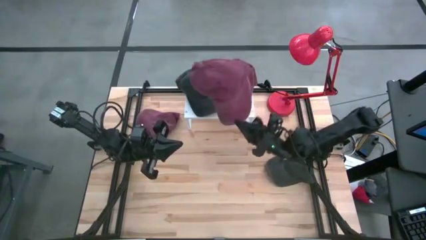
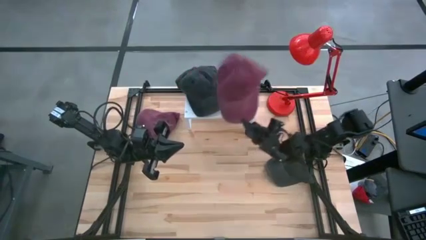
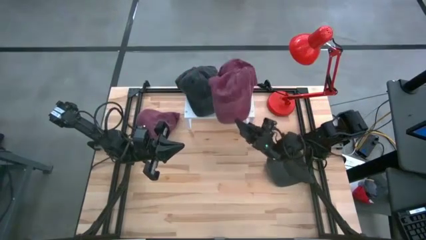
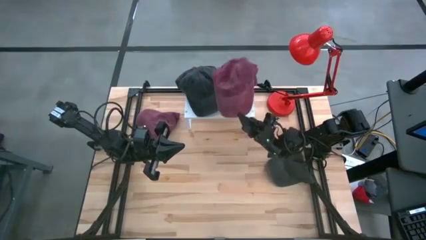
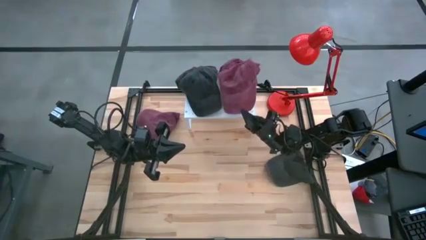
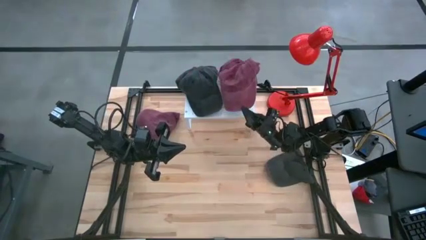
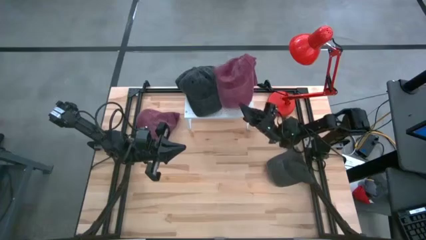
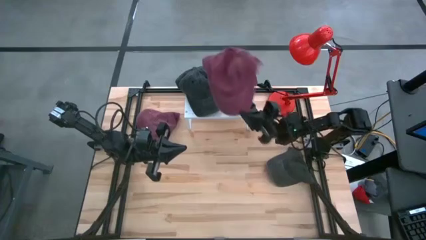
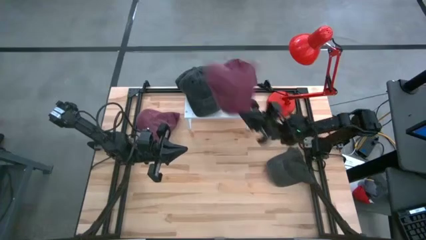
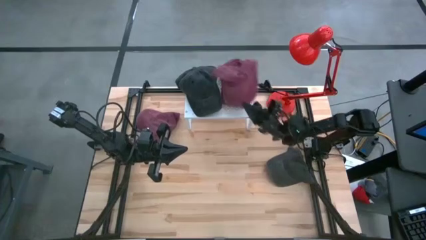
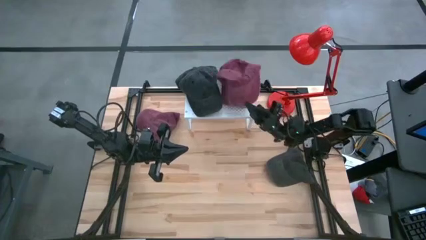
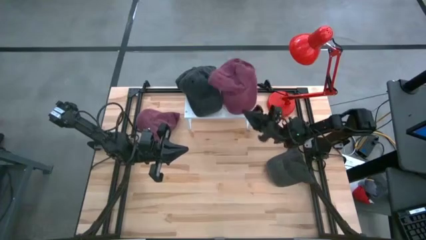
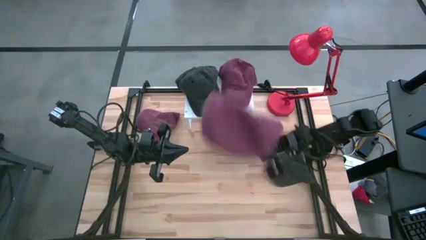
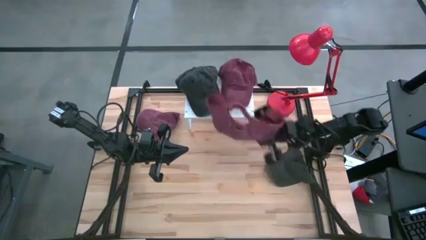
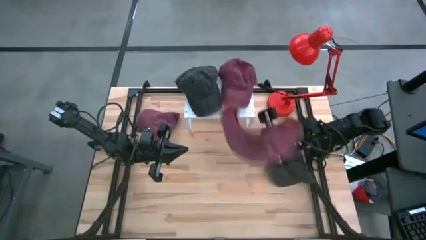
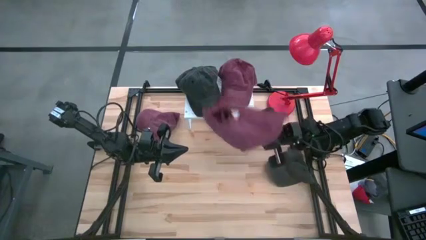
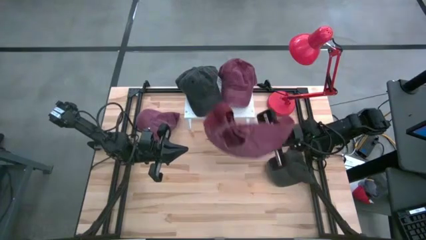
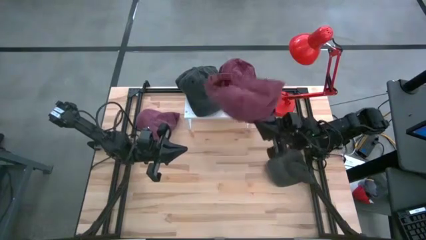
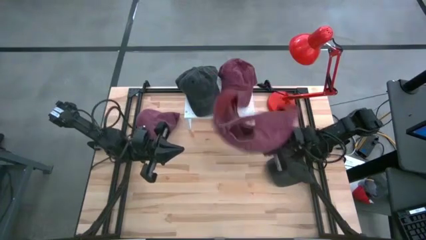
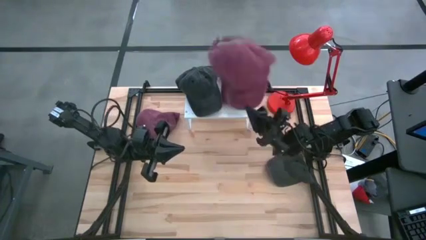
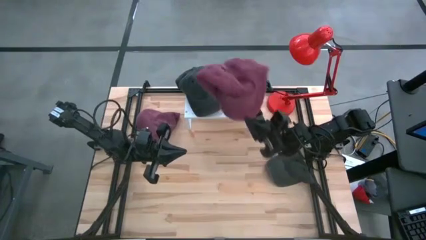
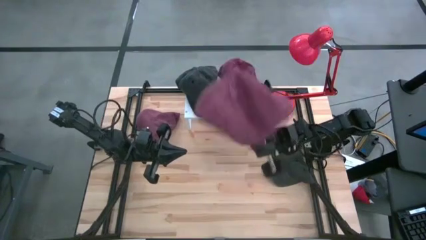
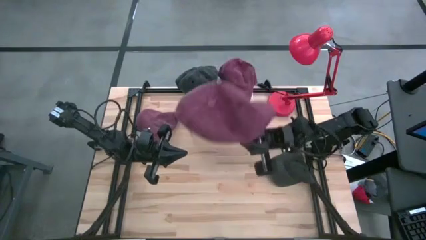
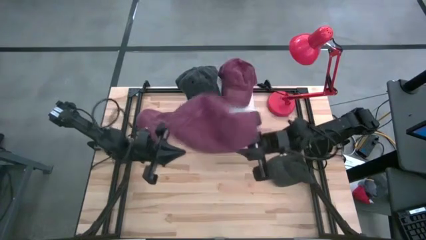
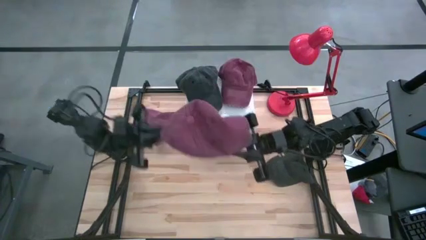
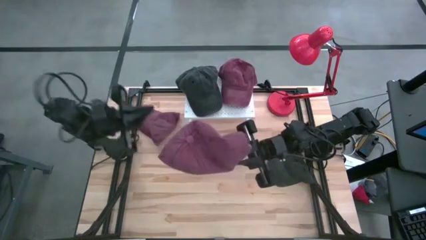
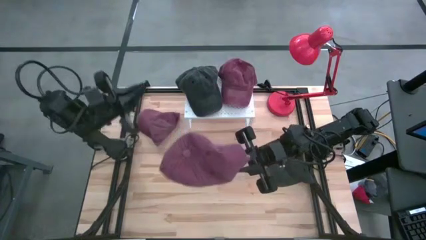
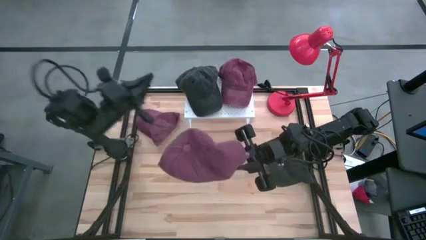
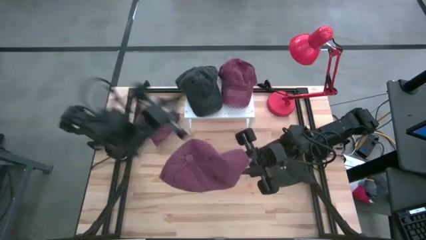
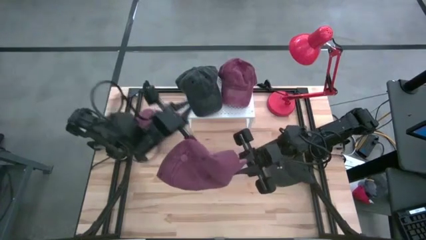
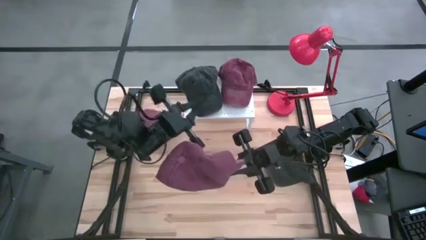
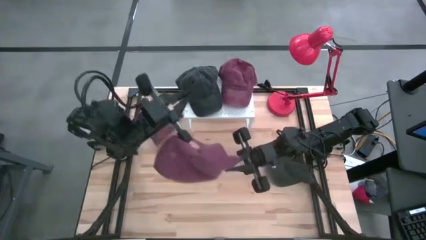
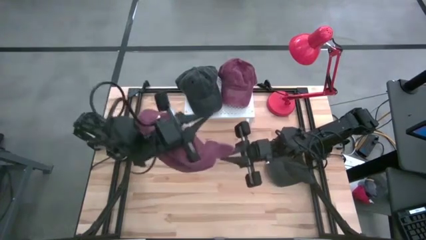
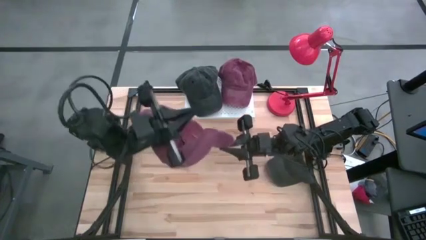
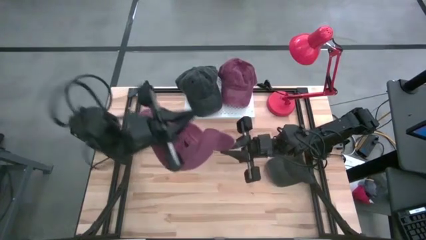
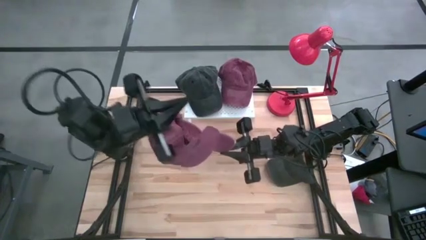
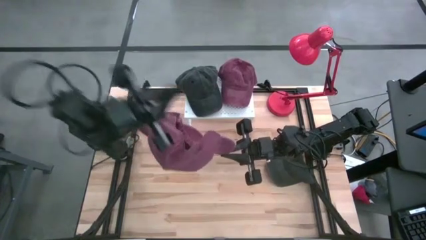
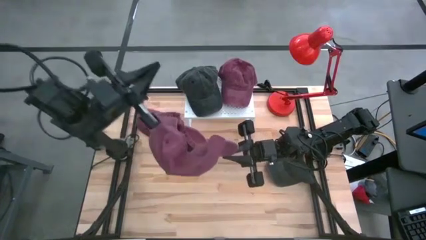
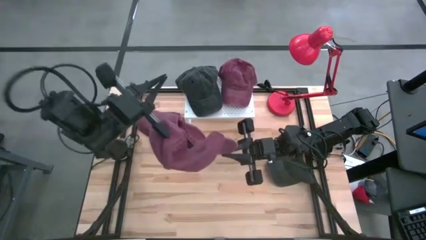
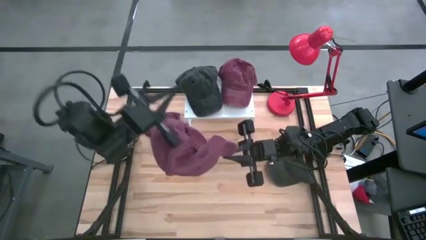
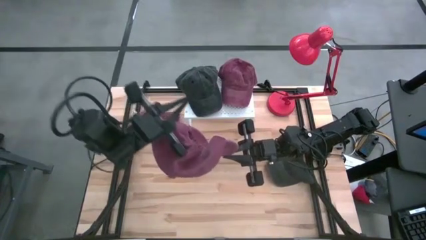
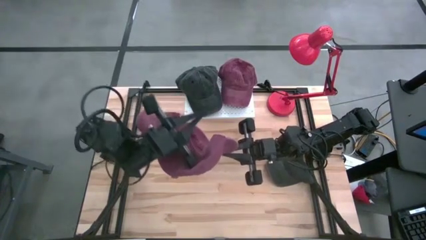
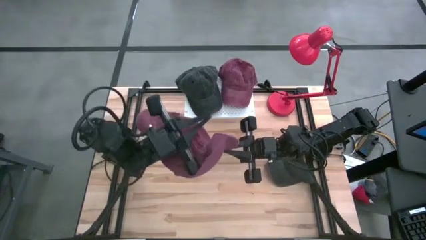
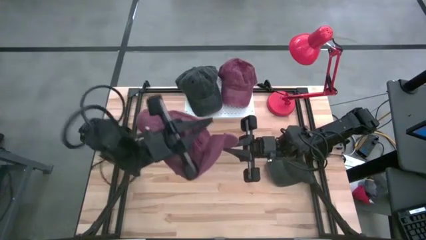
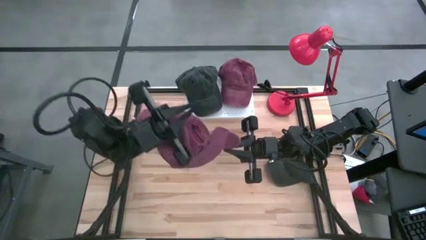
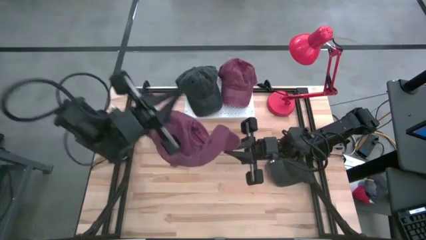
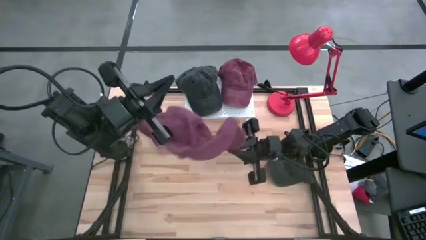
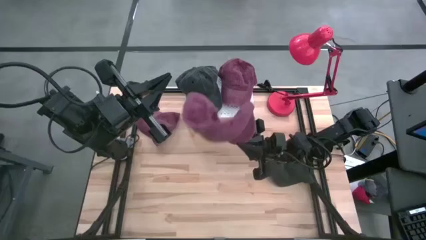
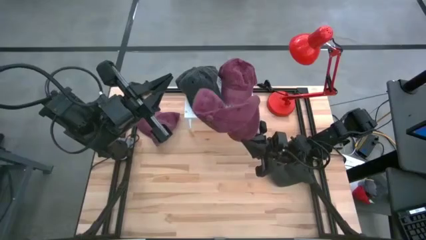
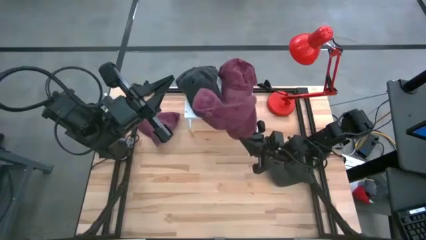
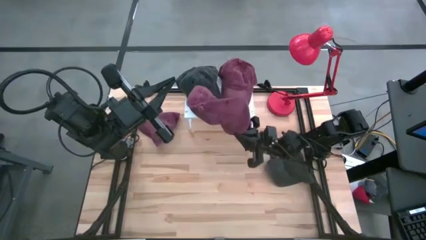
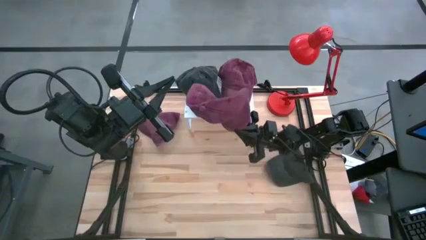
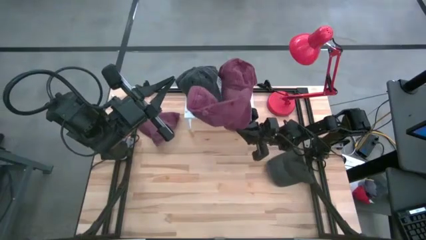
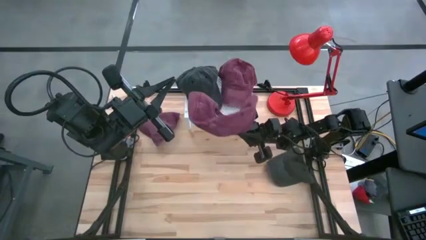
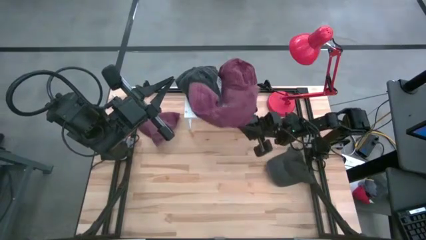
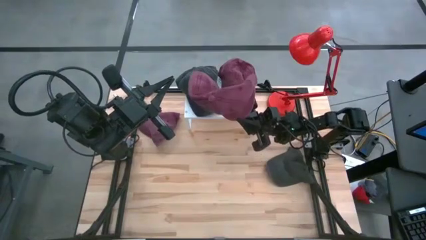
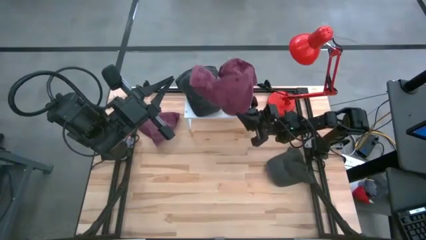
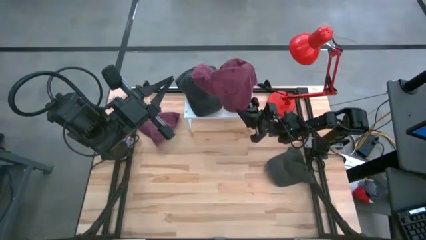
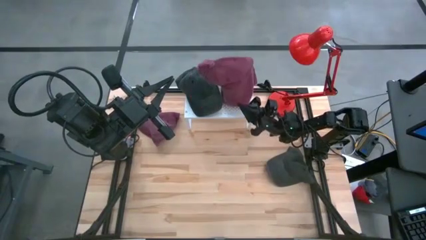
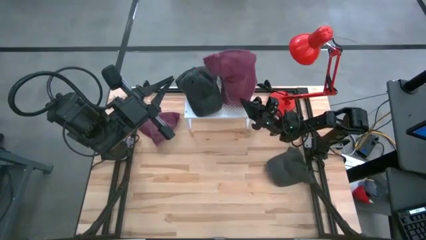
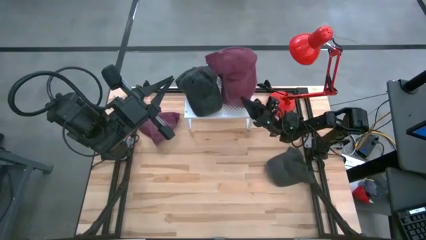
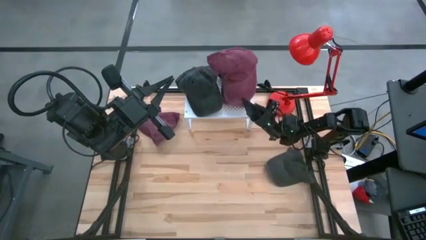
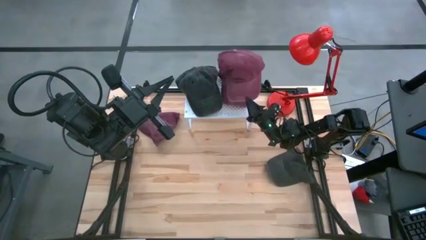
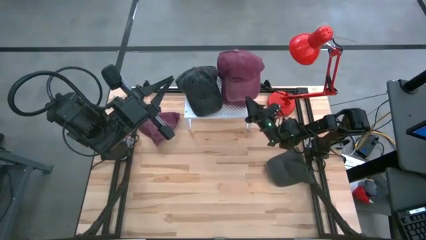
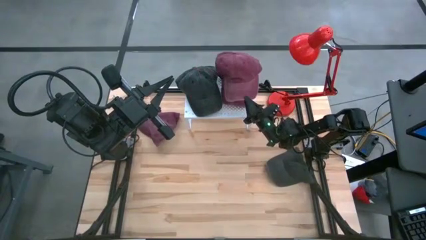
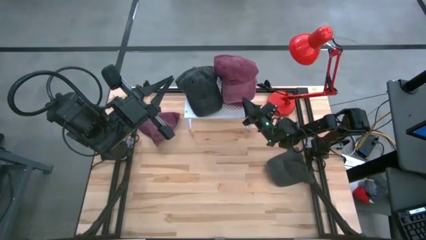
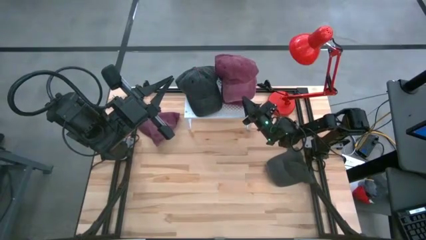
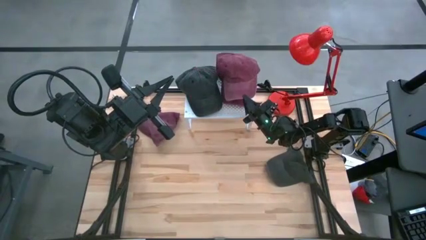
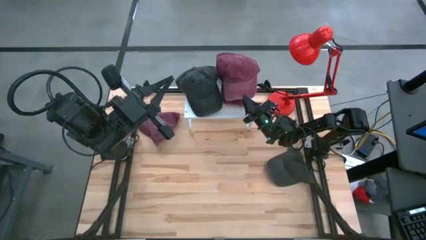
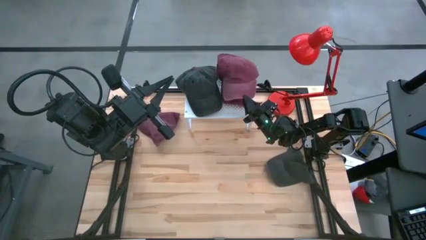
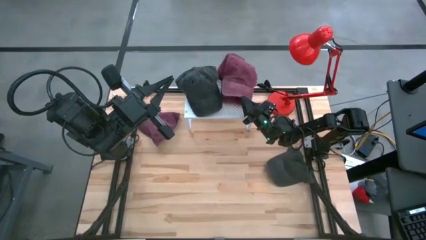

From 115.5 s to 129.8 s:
Task: Pick & Place hat
Stack the bottom red cap on top of the red cap on the shelf
